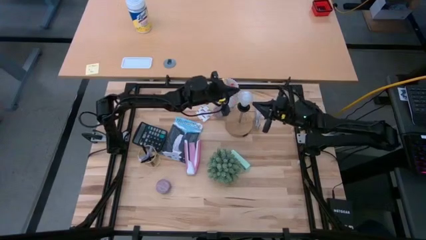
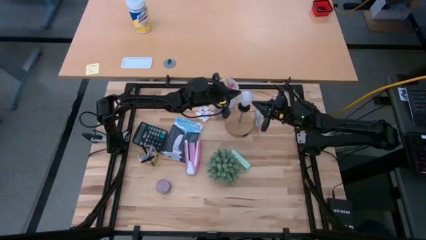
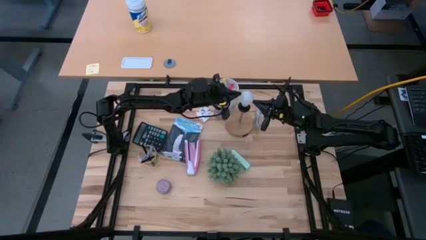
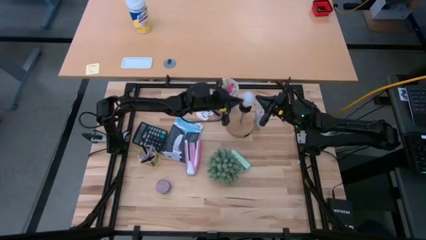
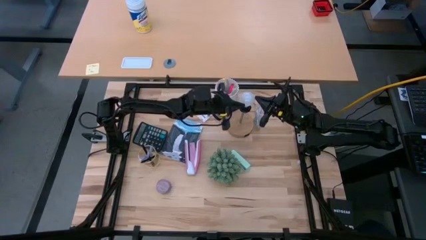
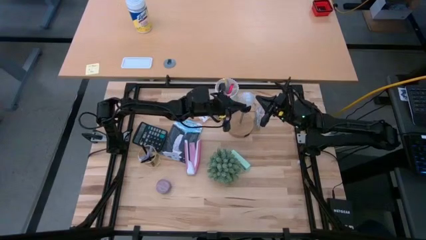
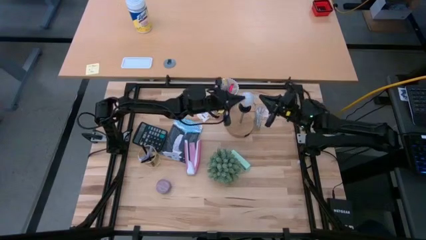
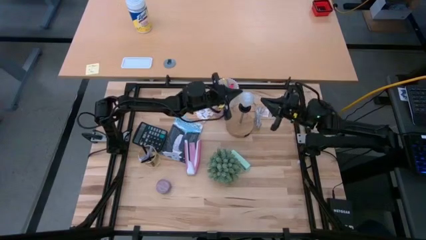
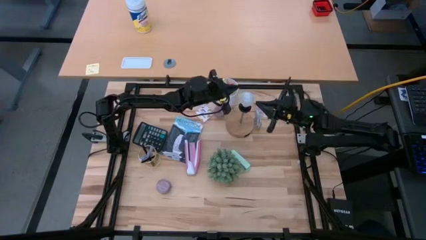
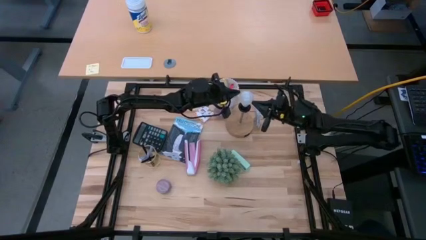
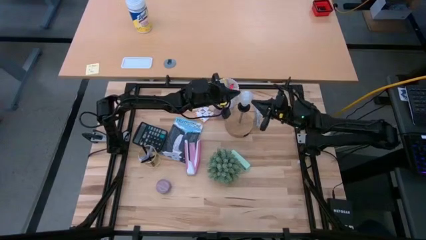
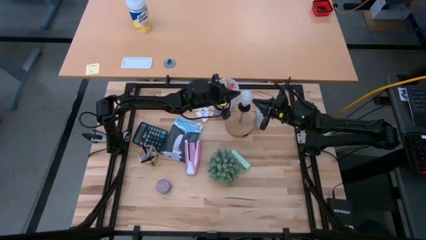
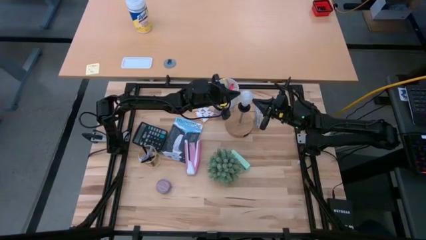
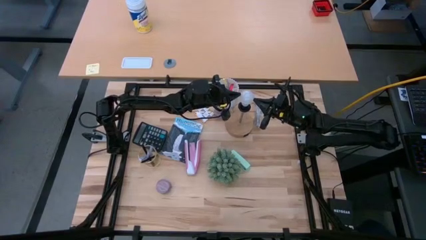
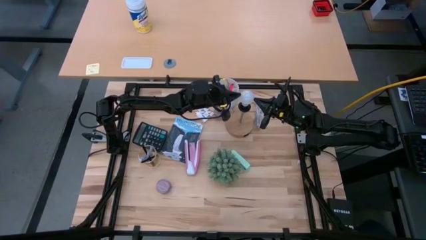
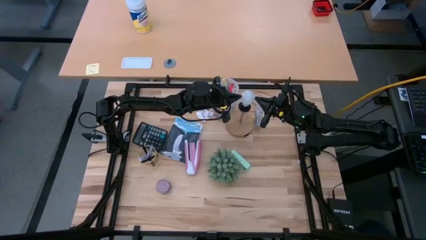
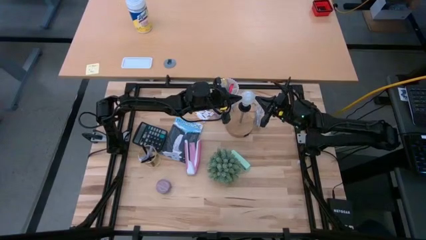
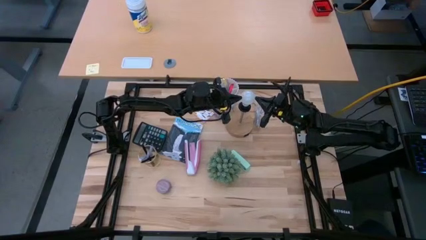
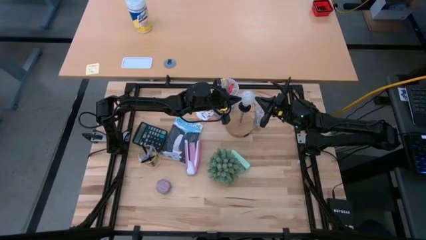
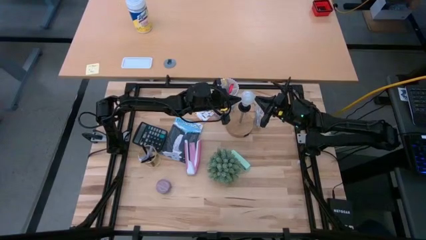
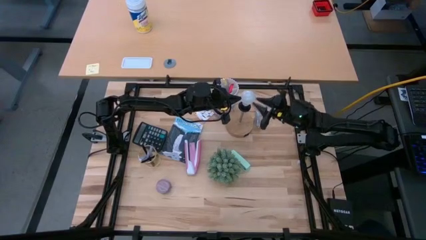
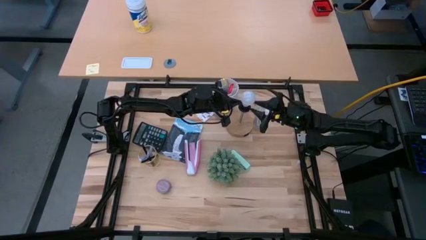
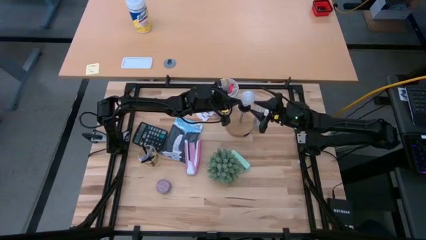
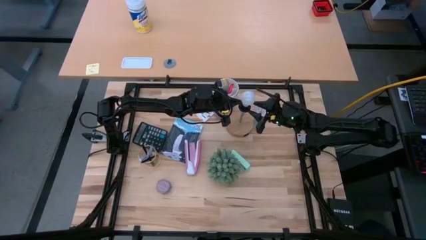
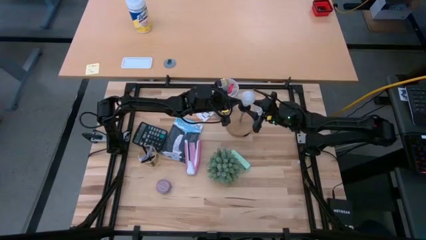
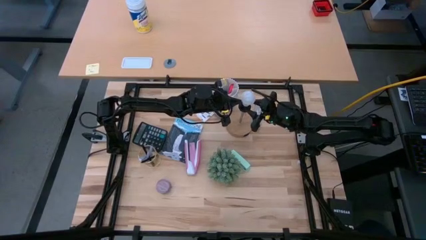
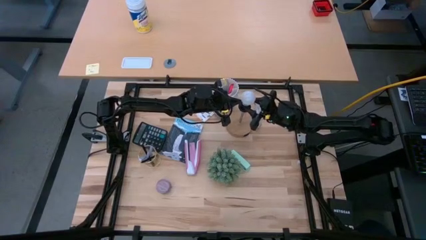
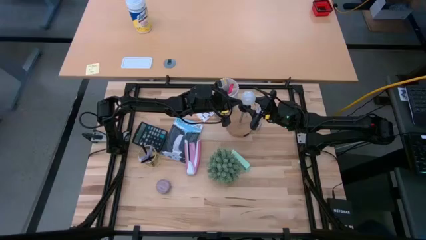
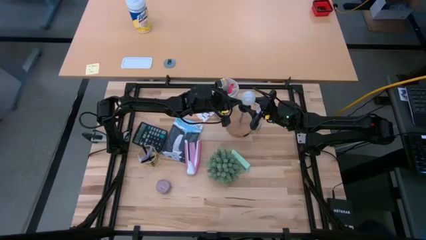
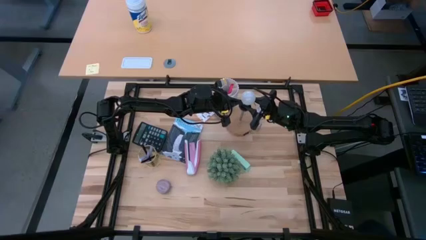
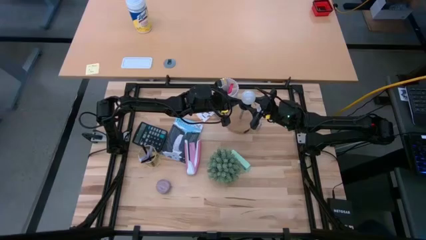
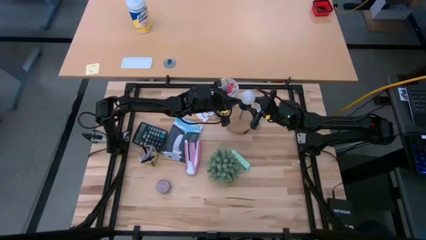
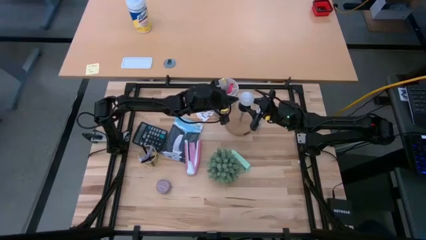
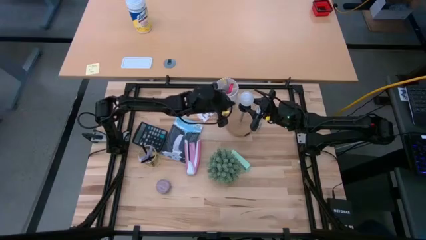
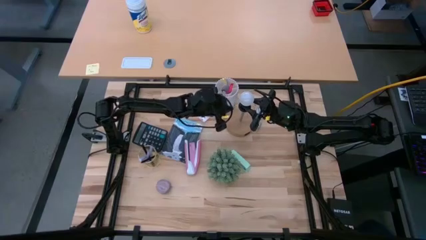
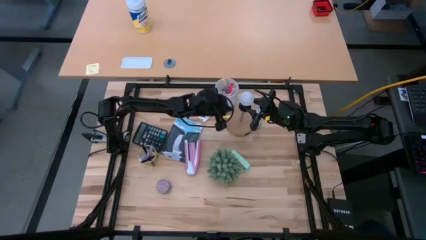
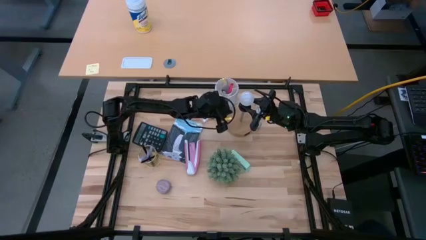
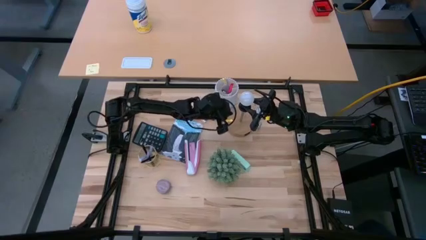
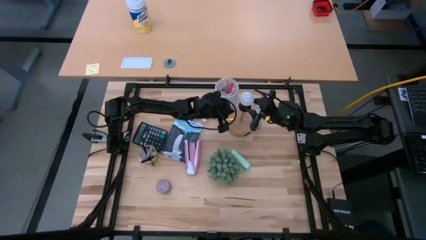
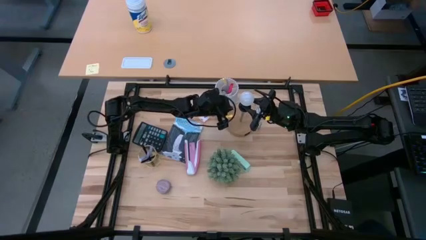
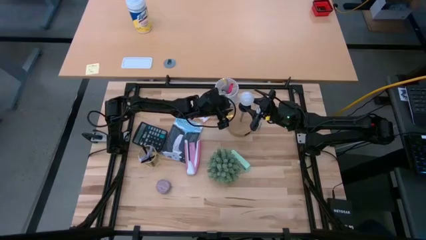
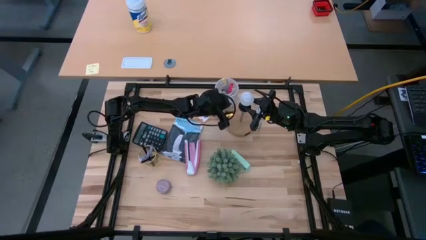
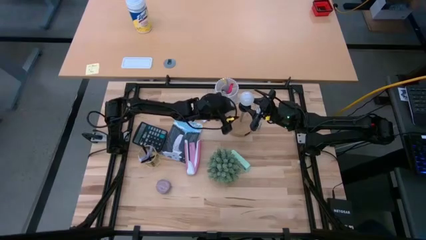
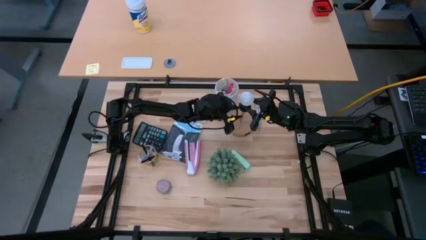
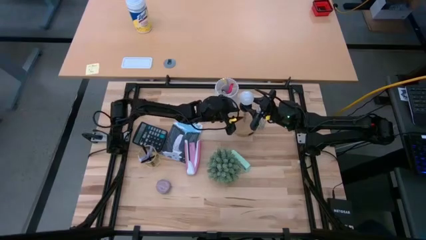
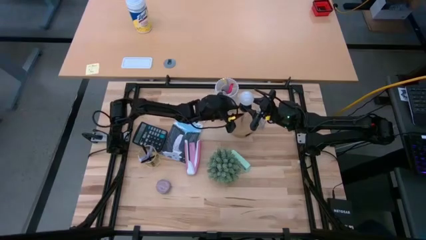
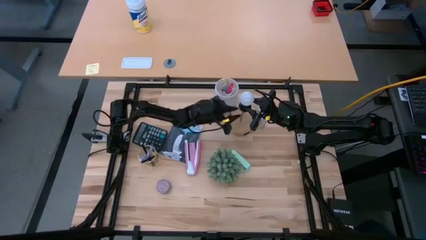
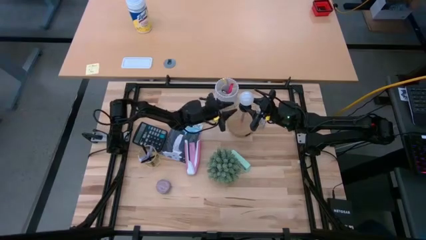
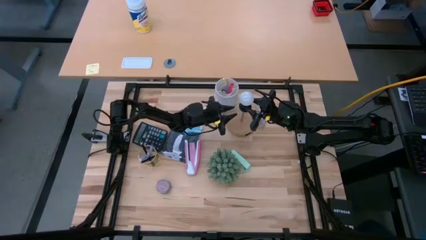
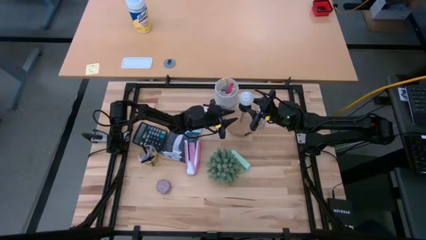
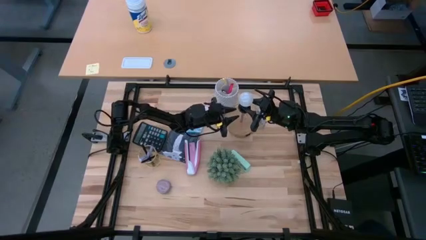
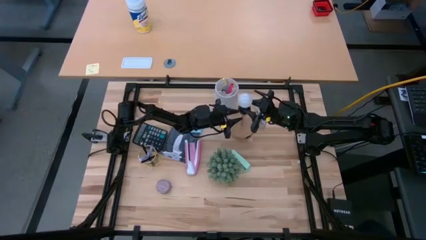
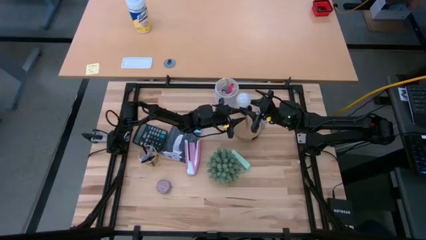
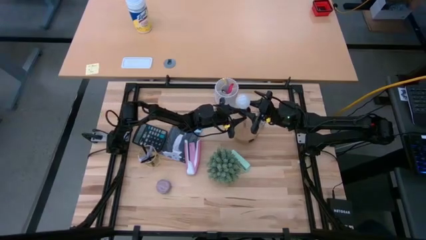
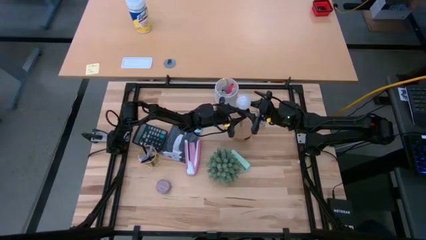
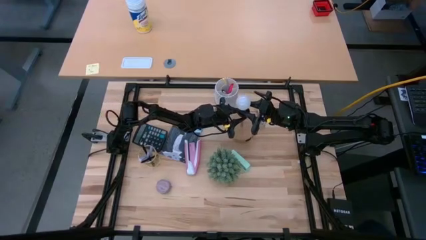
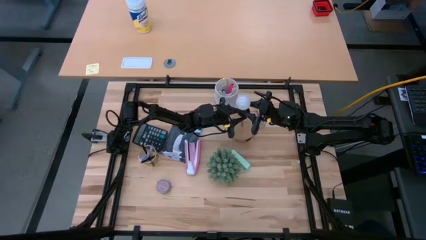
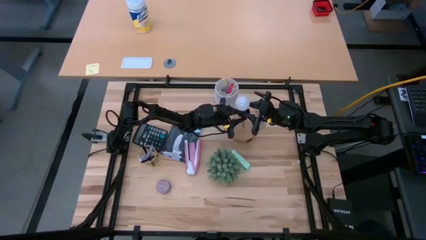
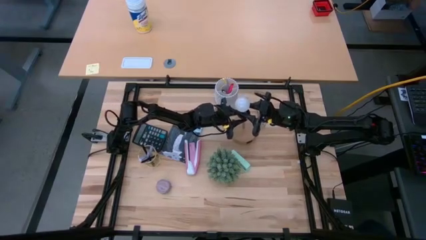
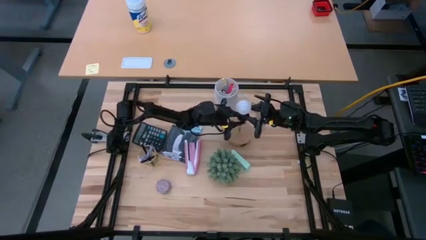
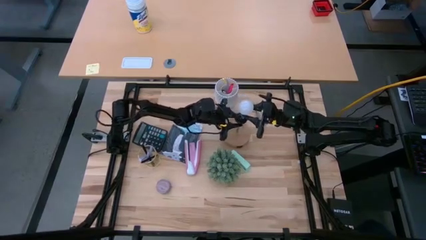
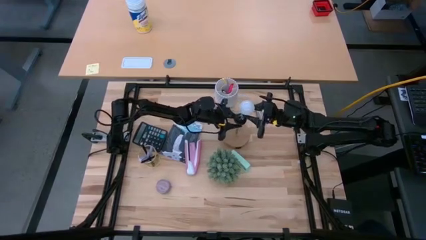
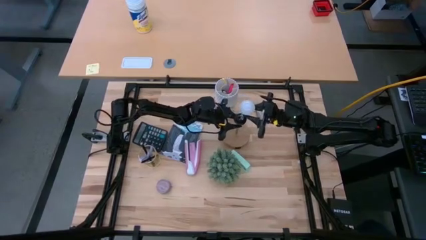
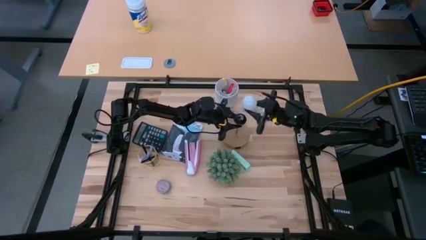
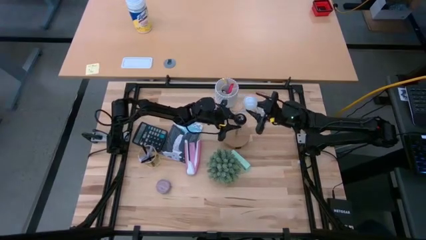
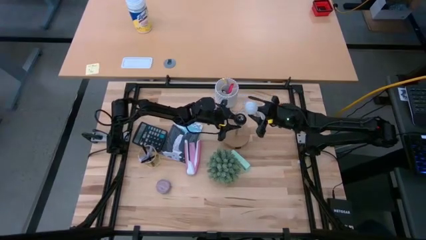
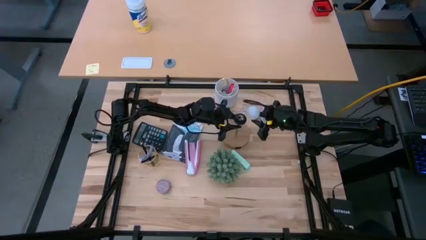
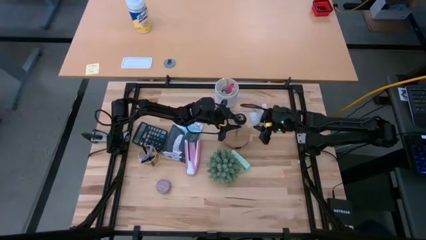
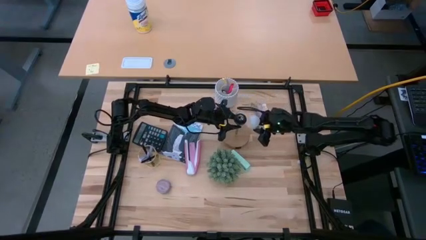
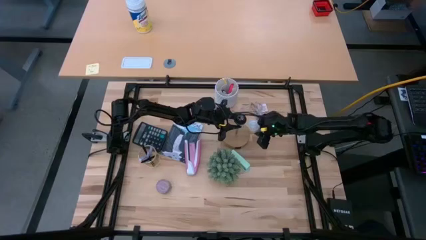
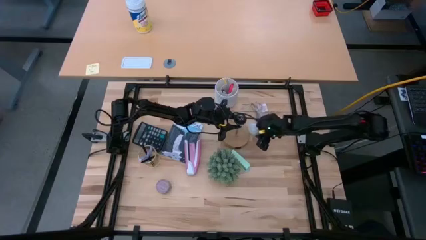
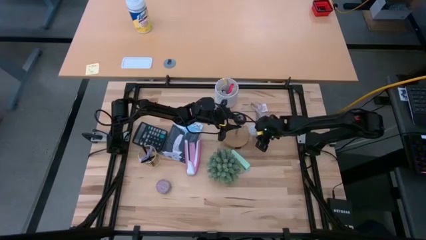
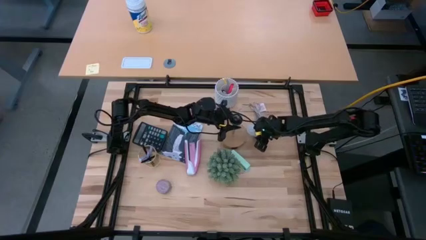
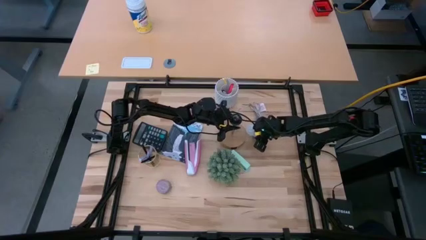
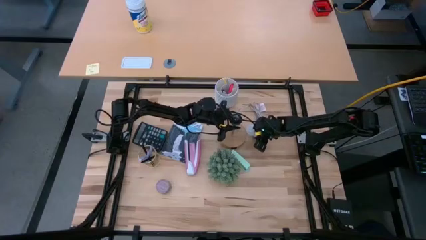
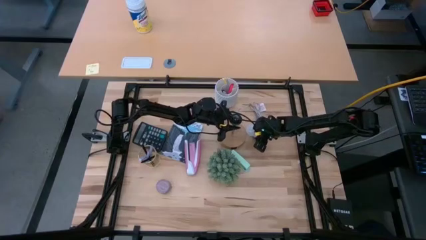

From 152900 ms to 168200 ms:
Task: Screw lightbulb
Remove the lightbulb from the lamp
